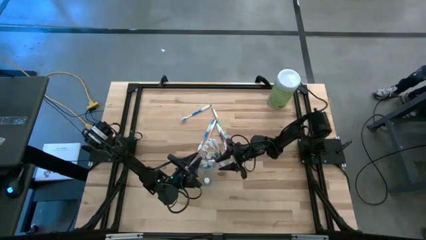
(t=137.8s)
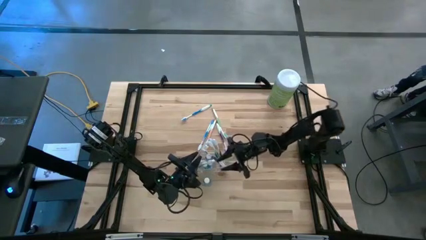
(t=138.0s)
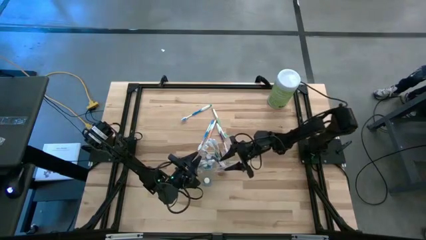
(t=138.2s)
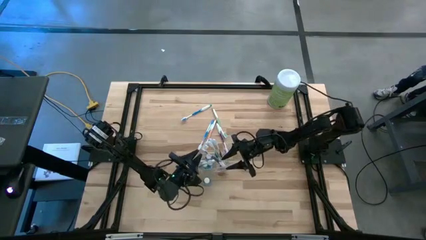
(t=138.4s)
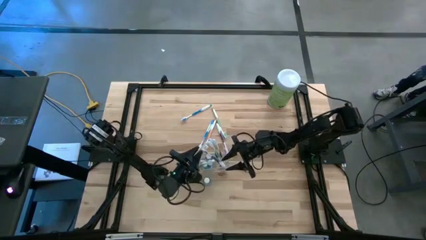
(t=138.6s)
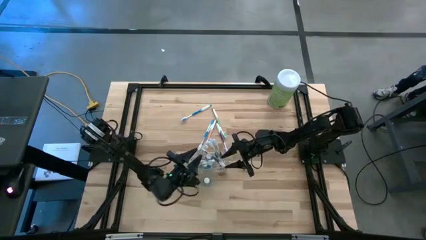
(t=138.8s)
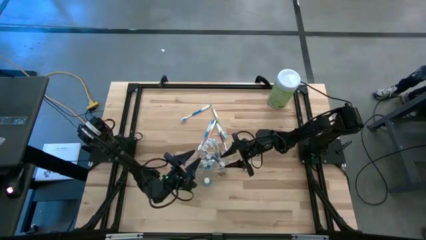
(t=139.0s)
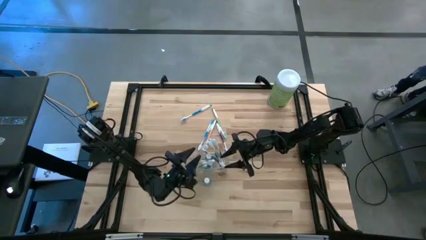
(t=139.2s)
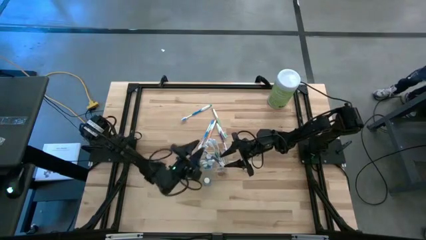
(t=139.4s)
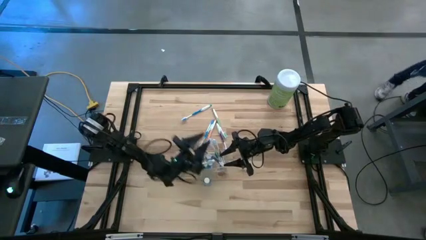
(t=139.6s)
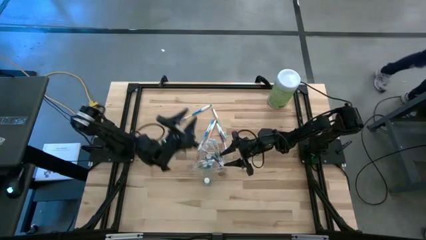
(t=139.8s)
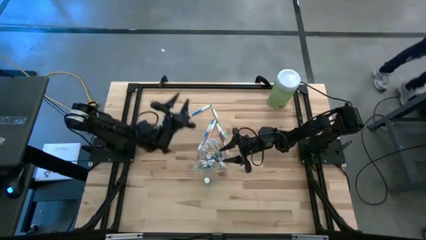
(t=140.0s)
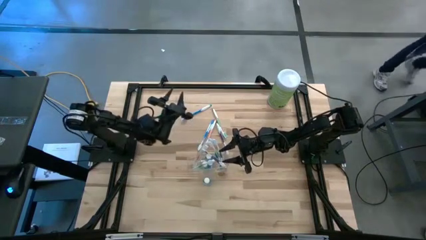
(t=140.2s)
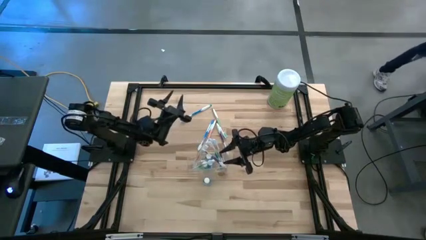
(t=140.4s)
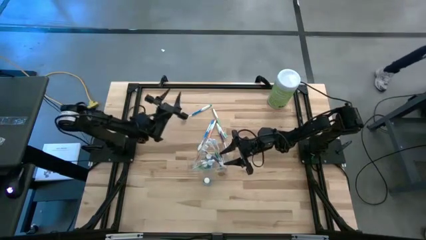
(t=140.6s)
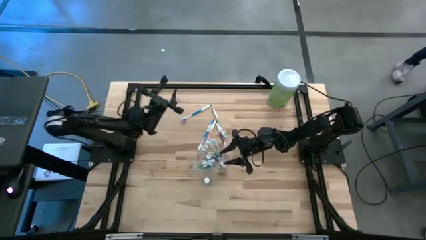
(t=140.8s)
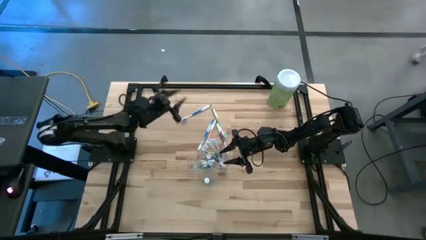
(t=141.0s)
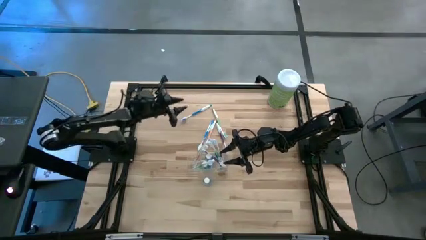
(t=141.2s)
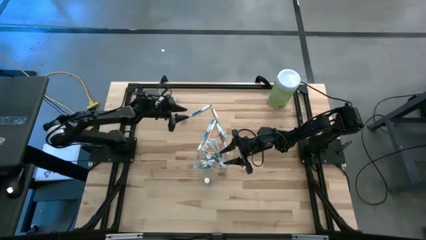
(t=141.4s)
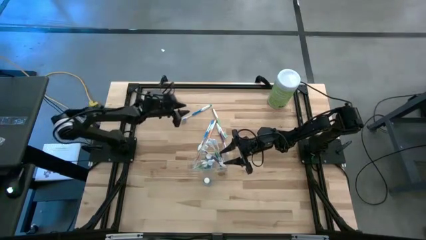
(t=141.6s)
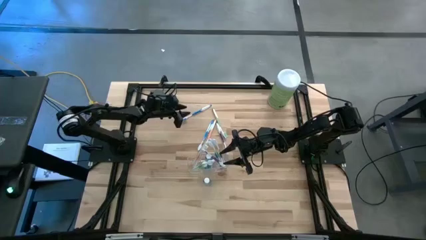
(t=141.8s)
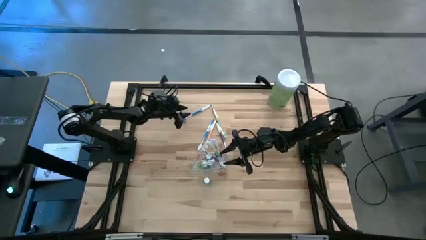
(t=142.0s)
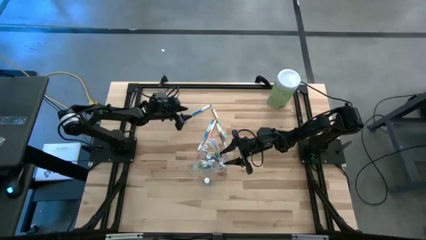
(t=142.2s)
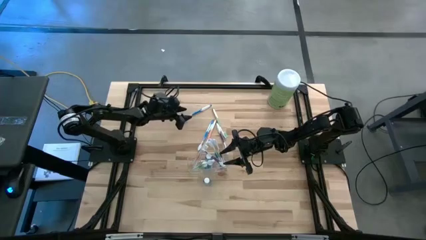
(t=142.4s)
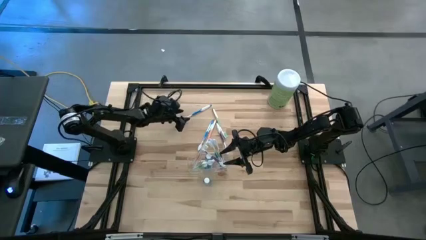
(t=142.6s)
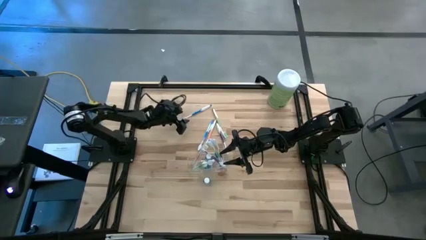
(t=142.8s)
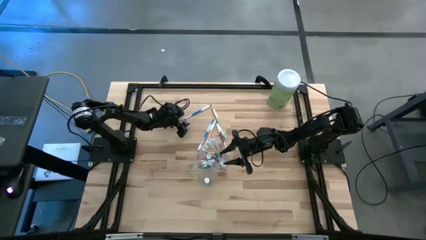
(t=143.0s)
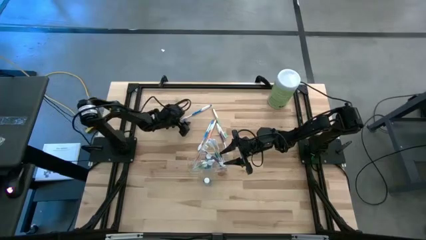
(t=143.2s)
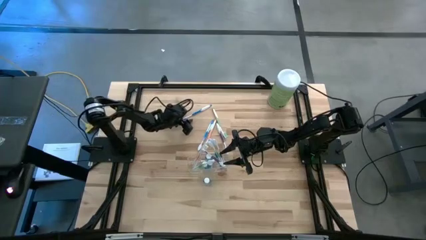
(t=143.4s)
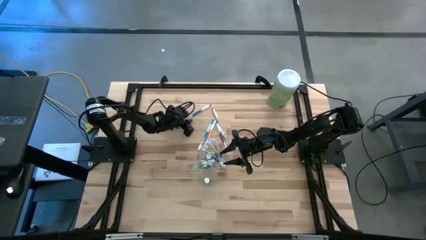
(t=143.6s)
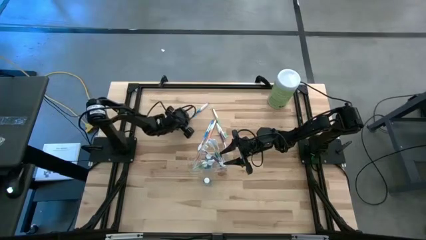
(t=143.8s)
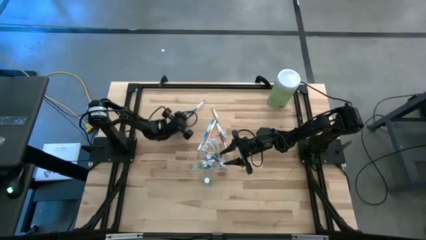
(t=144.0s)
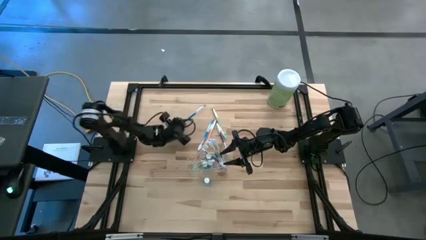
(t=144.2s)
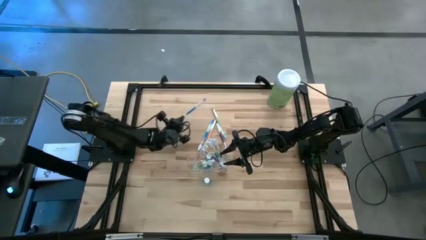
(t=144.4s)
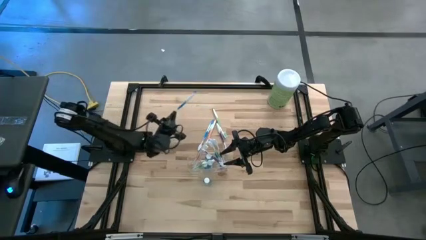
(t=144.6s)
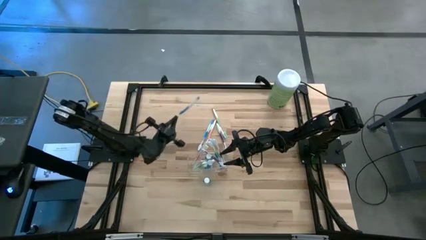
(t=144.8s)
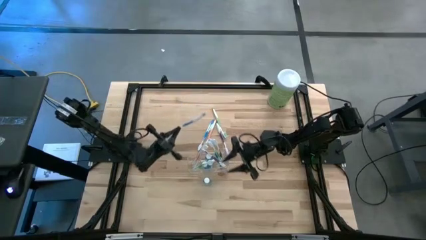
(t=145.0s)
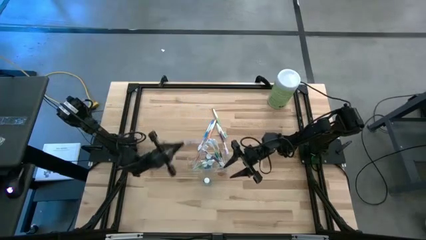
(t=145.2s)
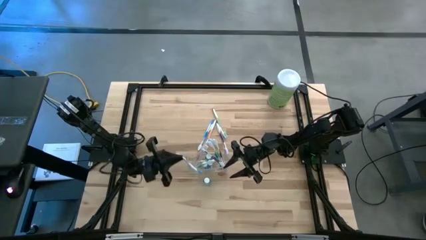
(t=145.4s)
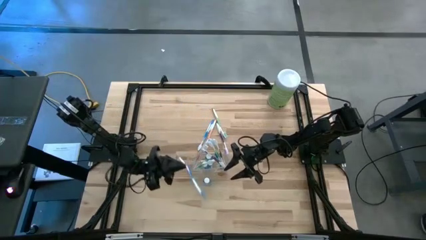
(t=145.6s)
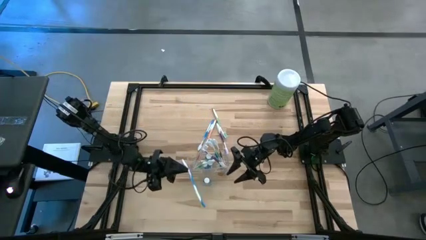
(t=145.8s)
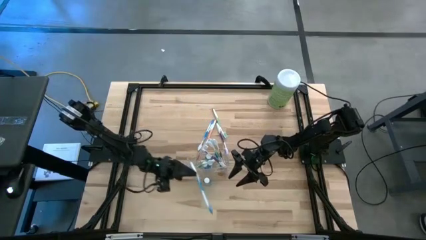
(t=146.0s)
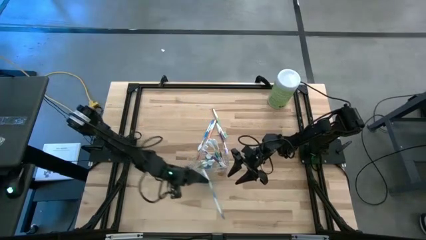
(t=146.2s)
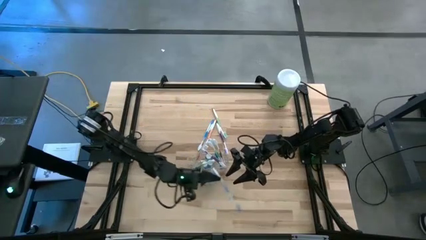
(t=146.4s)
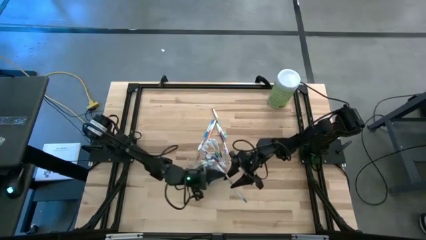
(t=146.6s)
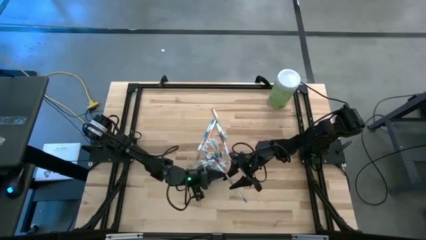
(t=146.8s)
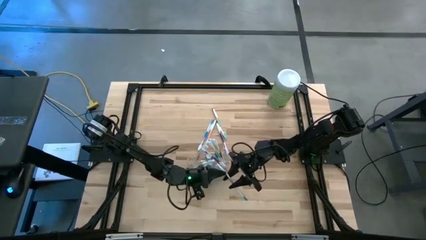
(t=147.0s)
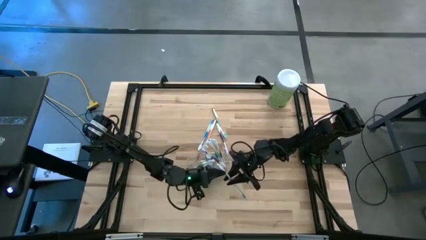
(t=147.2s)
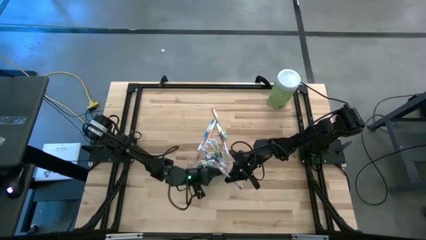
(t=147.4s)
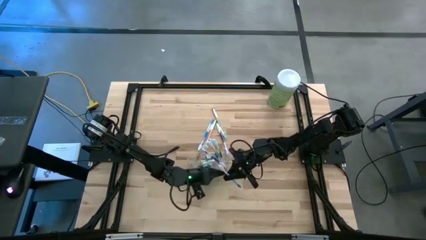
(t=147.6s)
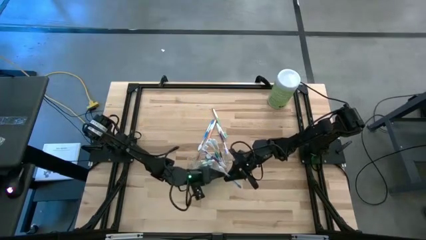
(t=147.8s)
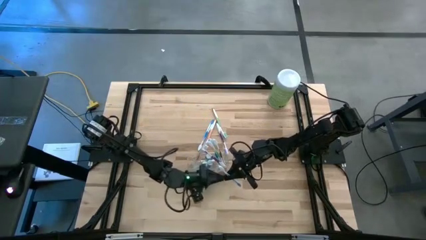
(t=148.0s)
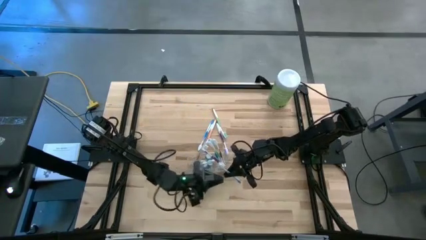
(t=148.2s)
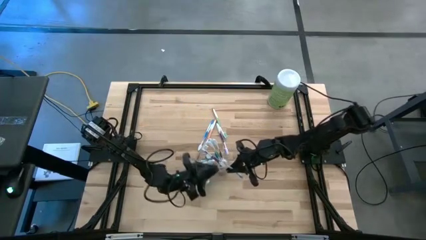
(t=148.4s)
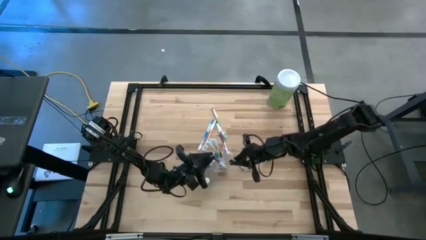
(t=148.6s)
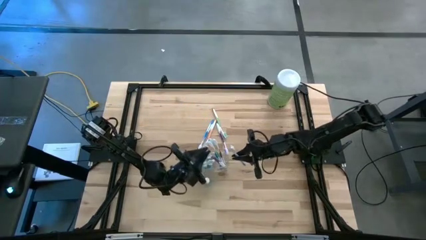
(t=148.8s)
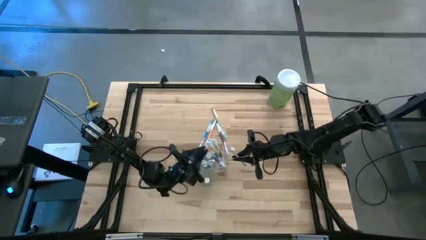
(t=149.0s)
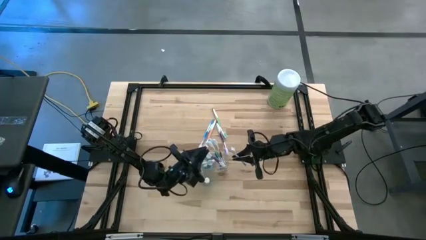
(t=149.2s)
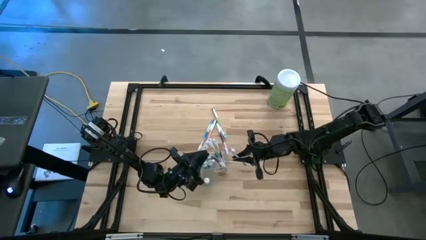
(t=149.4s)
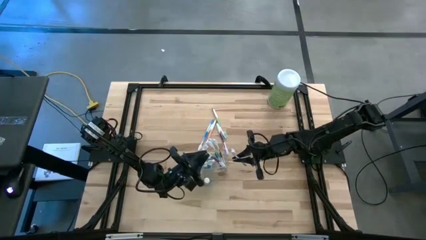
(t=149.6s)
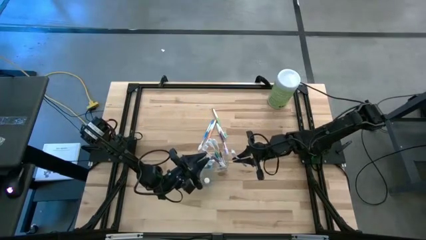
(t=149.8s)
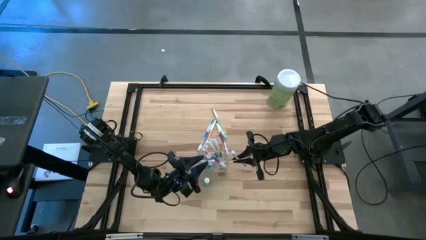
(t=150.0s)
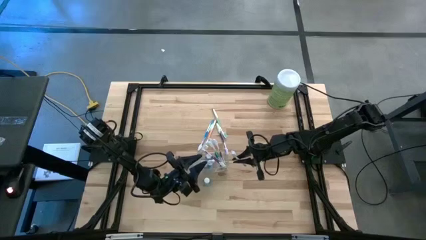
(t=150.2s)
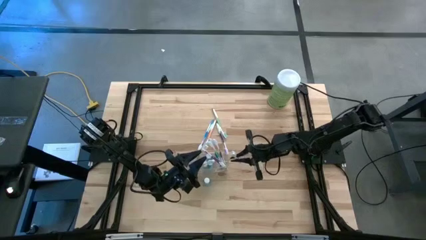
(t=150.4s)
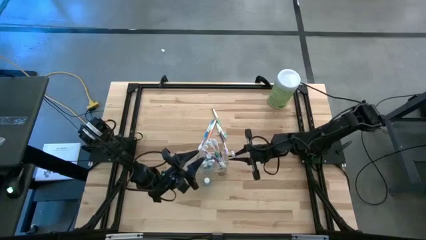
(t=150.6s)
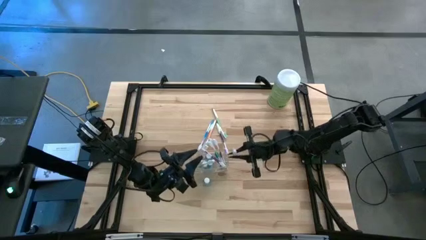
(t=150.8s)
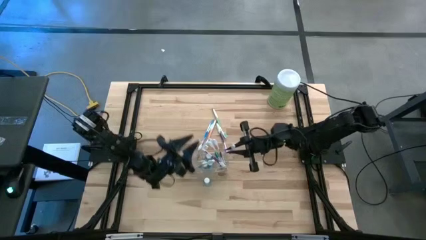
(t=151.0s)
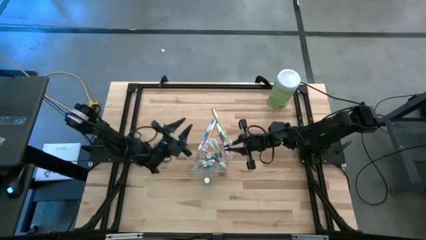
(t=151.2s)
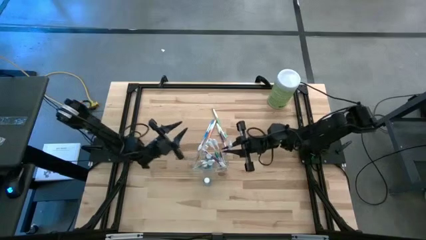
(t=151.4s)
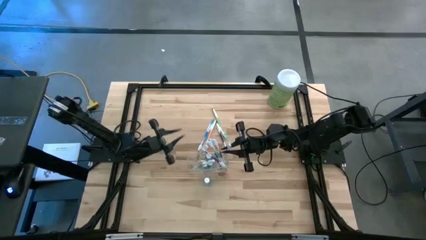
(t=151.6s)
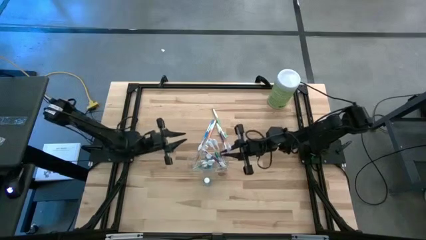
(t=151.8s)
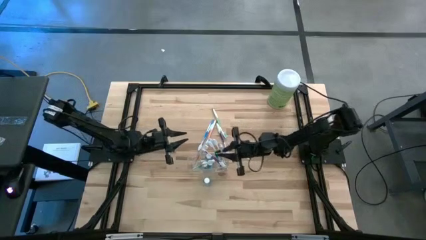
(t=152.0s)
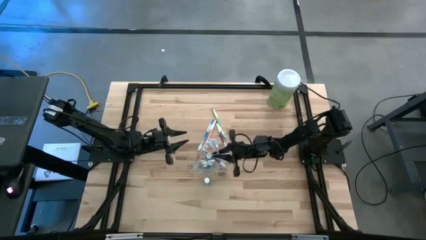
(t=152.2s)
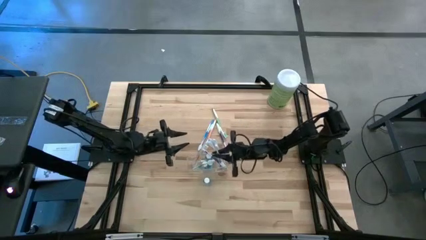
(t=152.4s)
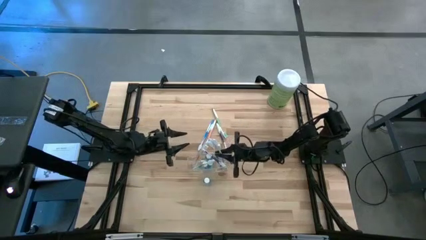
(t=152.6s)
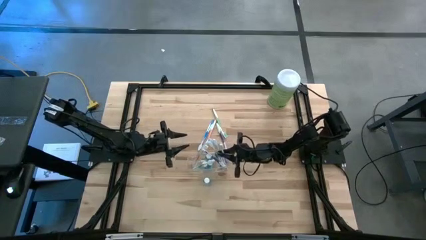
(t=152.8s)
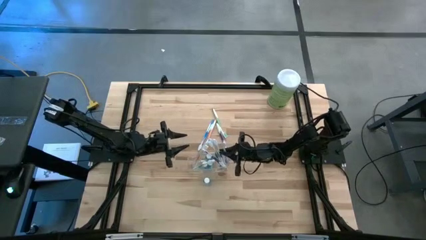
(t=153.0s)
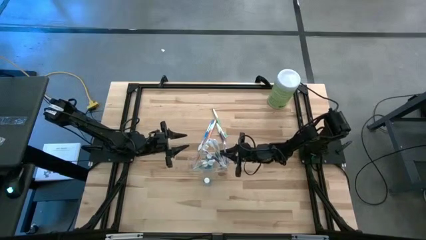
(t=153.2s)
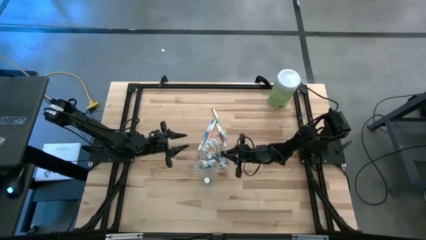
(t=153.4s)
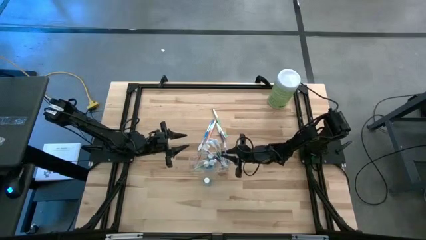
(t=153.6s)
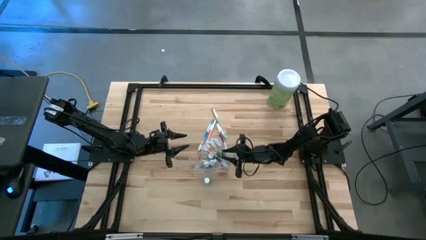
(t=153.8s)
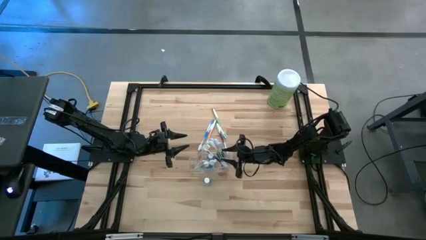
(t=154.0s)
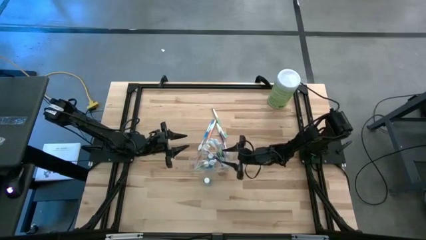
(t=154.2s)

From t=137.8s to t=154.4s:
Task: Pick & Place toothbrushing station
Put the blue toothbrush into the transparent organizer
